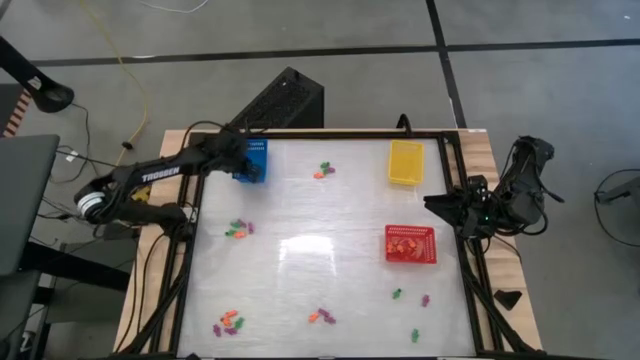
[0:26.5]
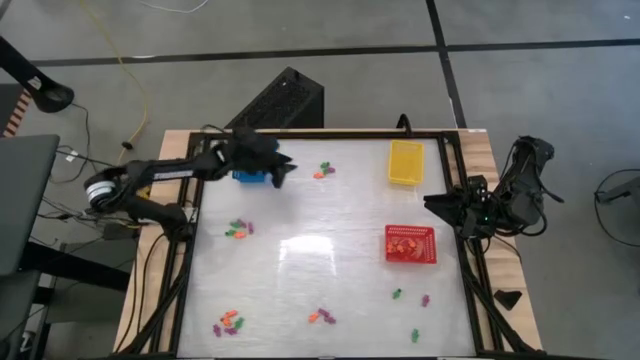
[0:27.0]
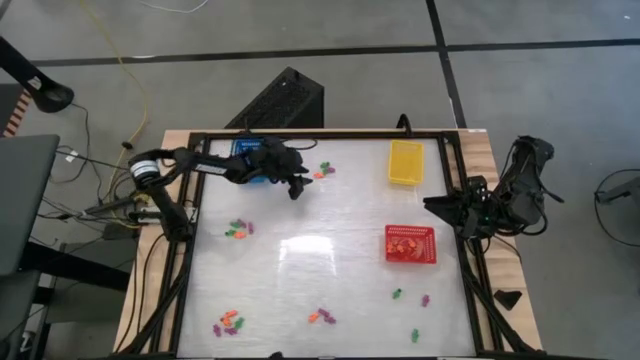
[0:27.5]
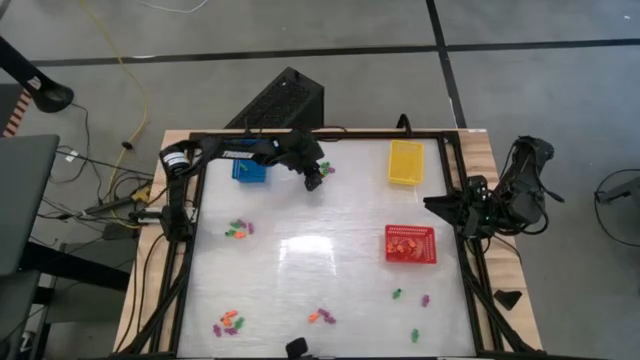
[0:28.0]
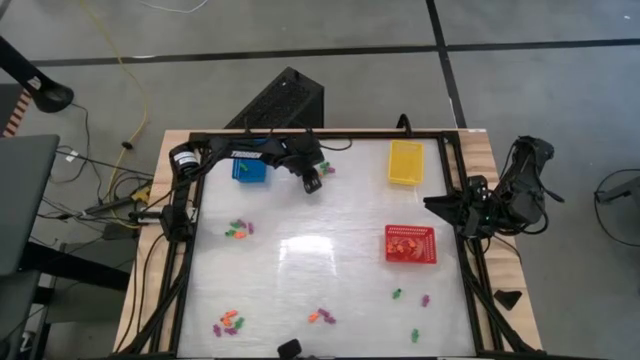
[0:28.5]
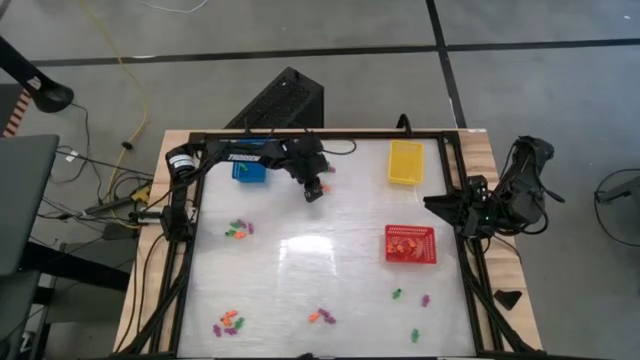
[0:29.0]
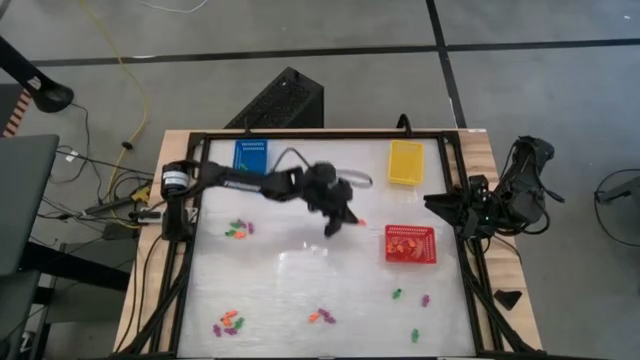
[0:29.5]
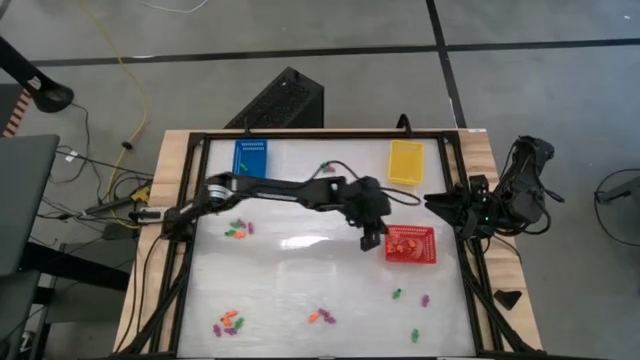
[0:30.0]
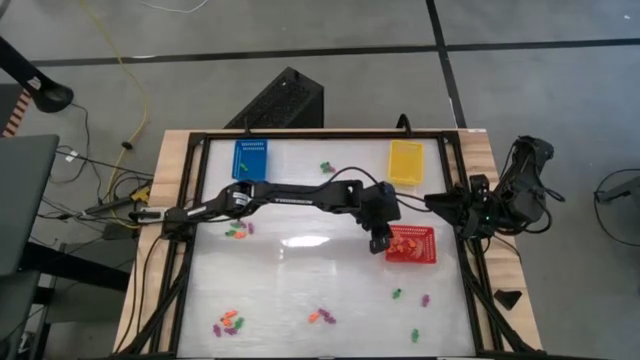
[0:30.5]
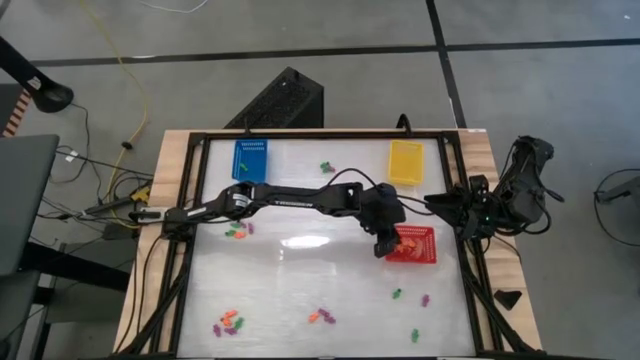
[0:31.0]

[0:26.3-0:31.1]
Task: Sort Halloween decoration
Put the orange skeleton toy into the red bin

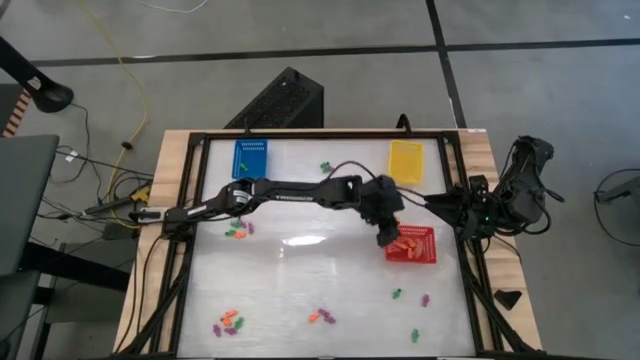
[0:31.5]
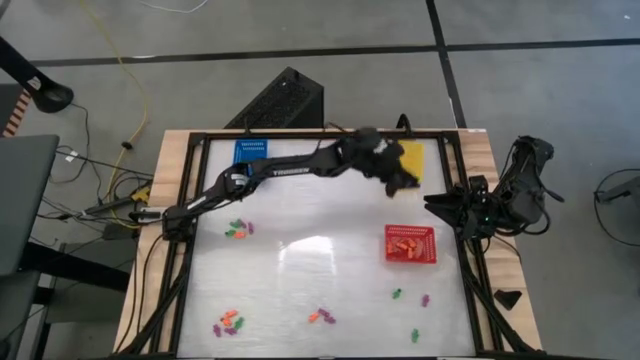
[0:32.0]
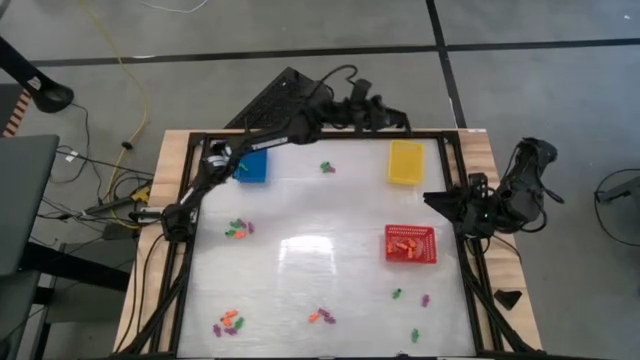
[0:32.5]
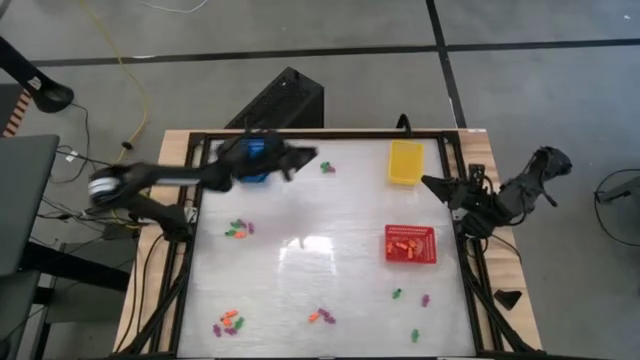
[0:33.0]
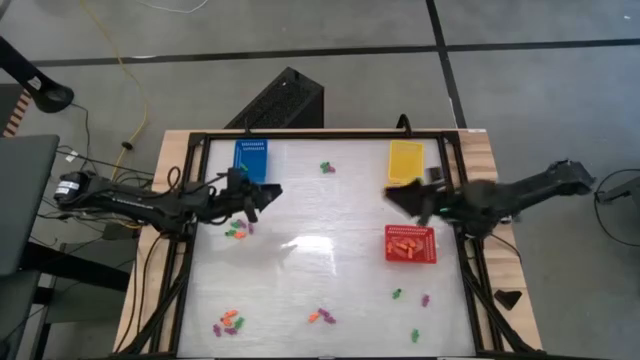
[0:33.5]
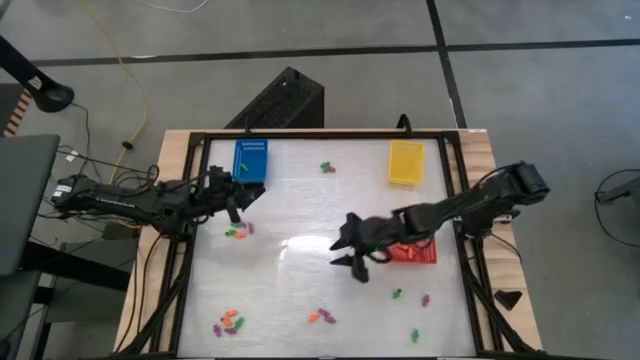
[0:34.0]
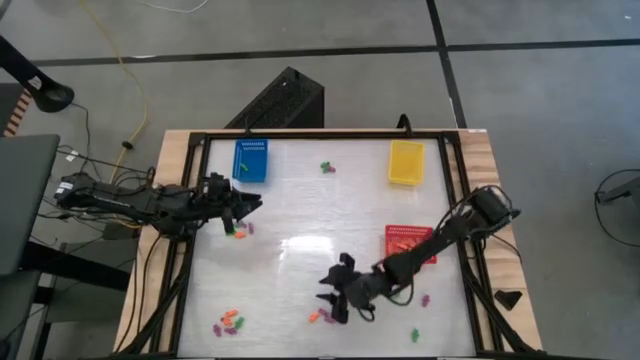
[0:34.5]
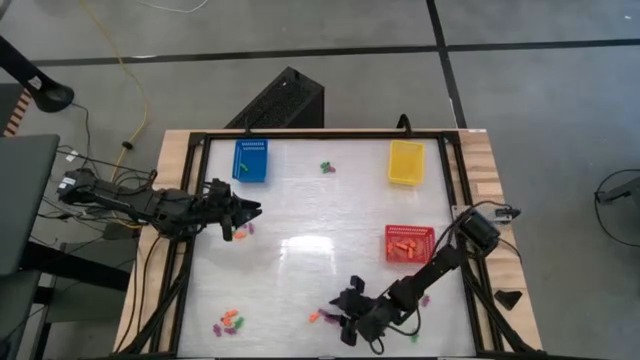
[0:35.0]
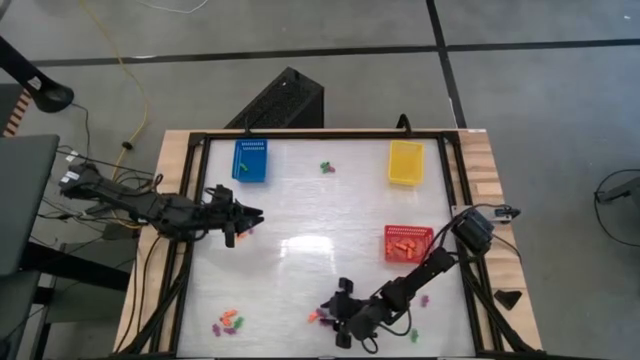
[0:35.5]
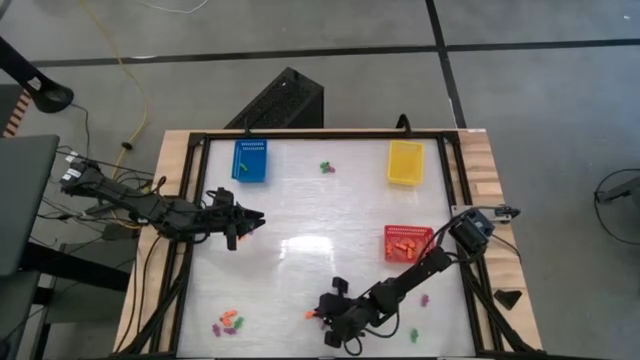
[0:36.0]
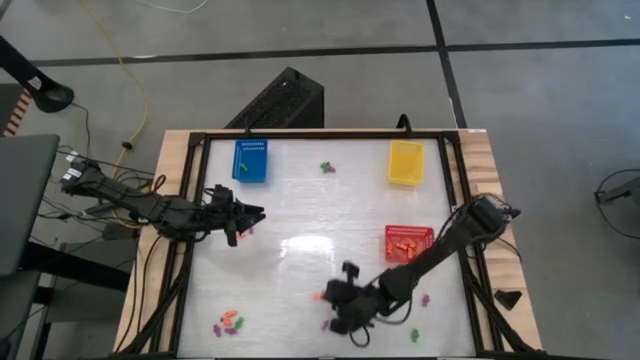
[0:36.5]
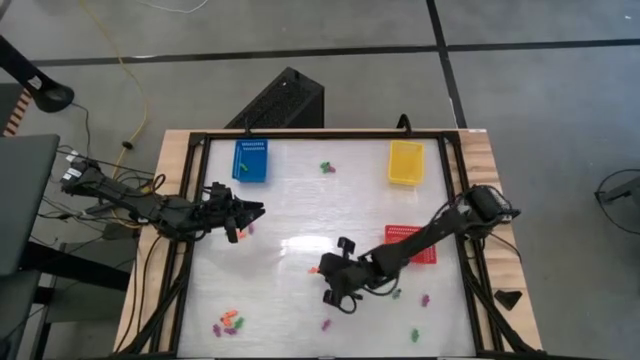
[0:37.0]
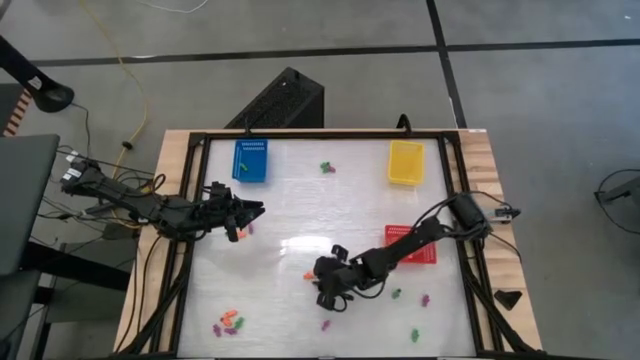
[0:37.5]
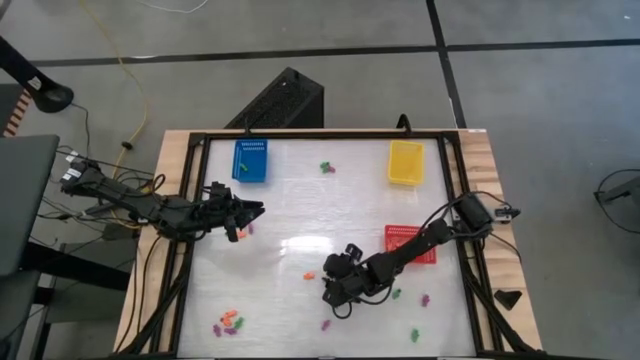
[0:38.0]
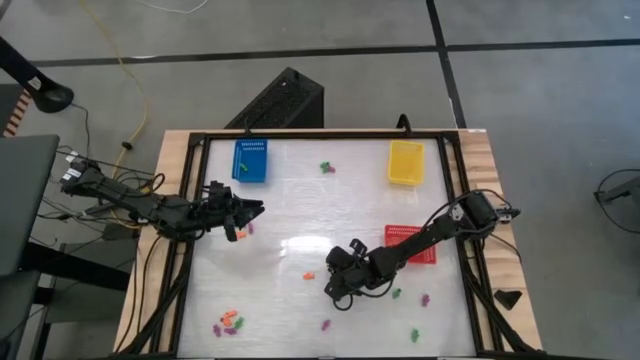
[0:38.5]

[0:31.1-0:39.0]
Put the purple skeleton toy into the yellow bin

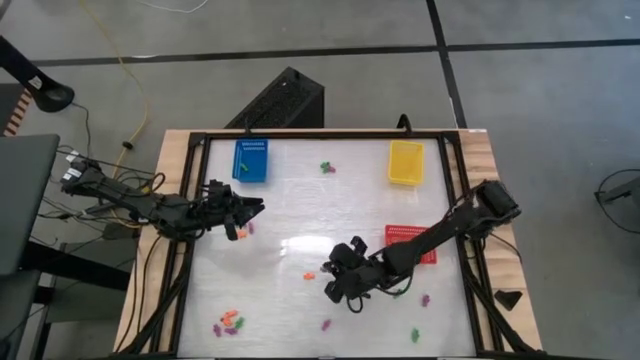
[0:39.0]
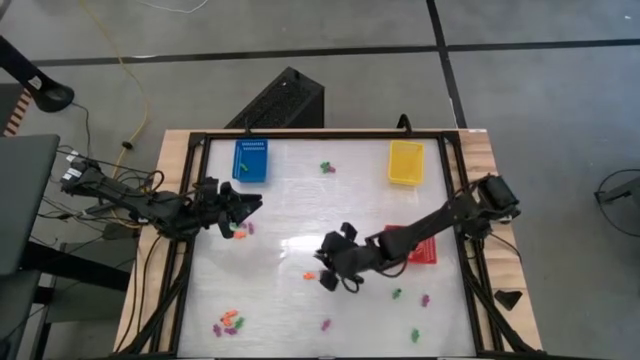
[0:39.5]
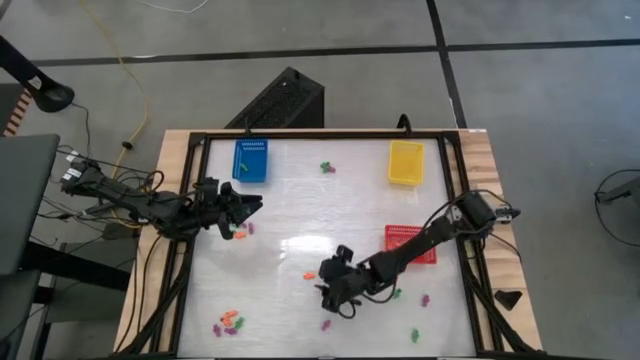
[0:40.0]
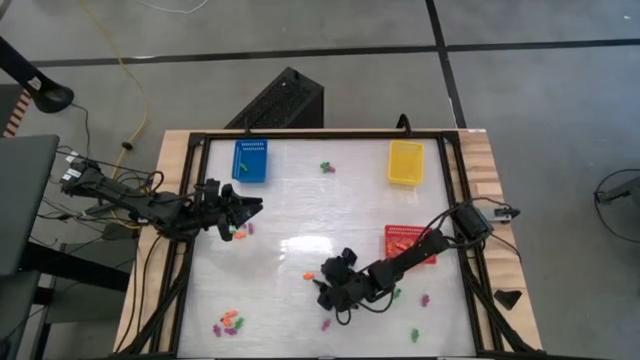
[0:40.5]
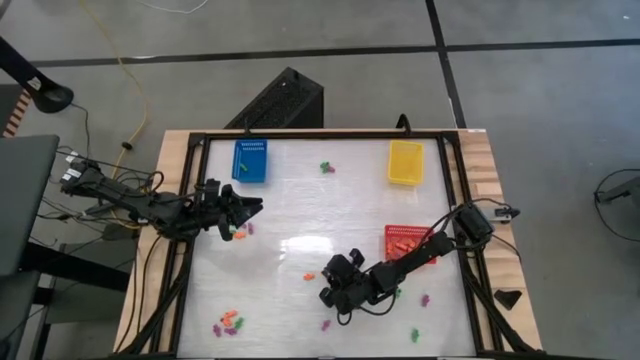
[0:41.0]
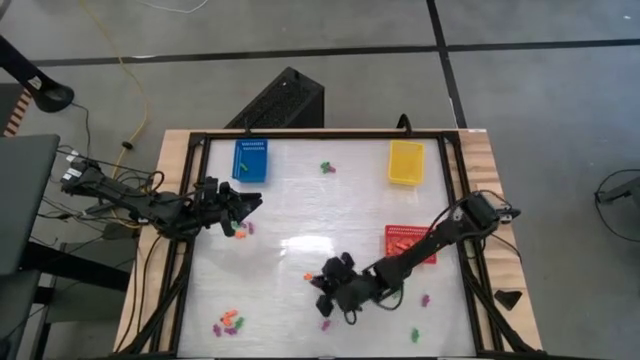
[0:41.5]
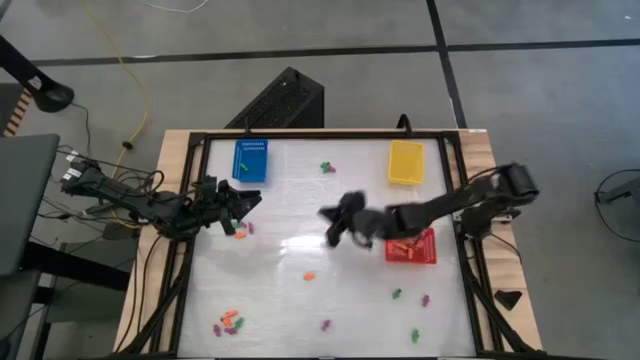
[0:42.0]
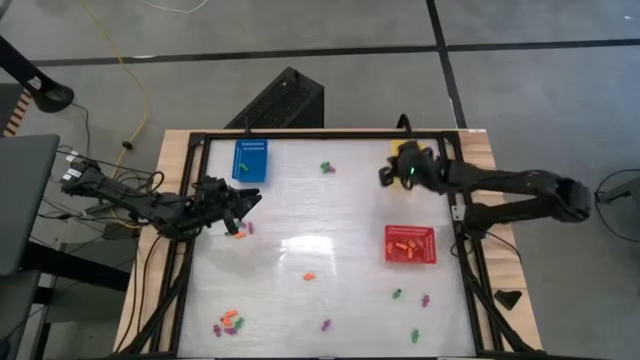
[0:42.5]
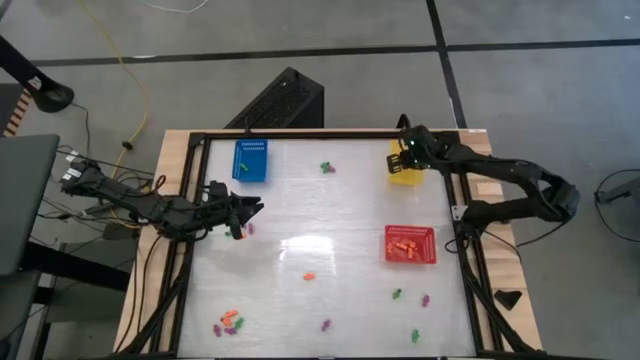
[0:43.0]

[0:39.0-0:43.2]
Put the purple skeleton toy into the yellow bin

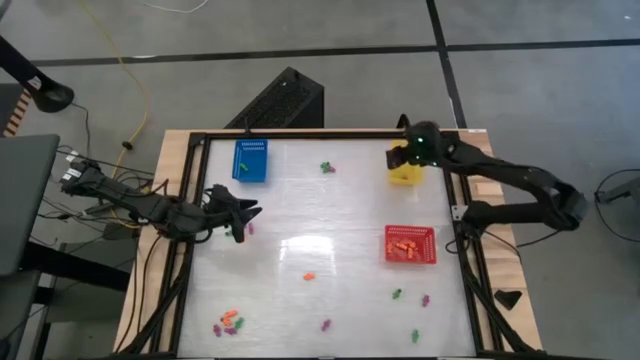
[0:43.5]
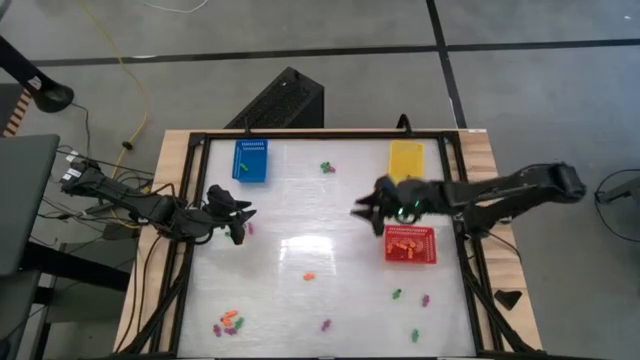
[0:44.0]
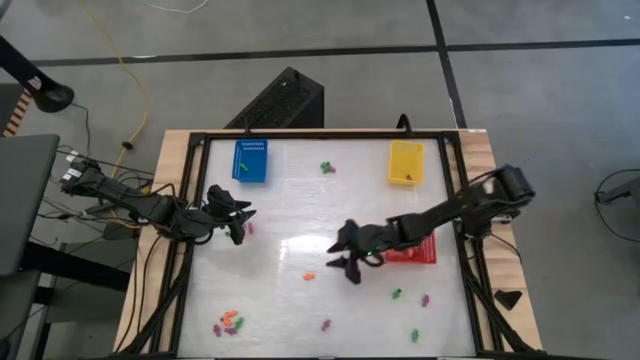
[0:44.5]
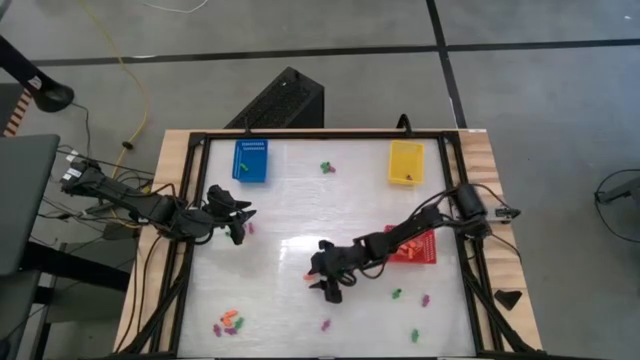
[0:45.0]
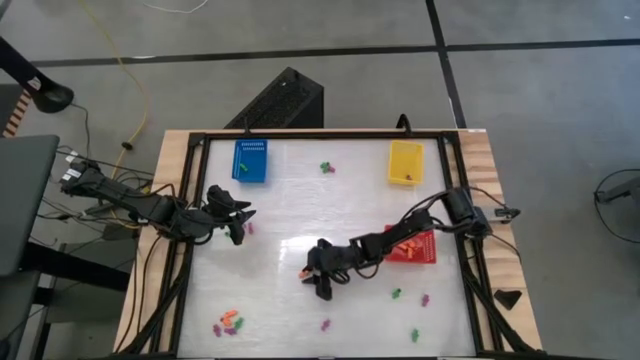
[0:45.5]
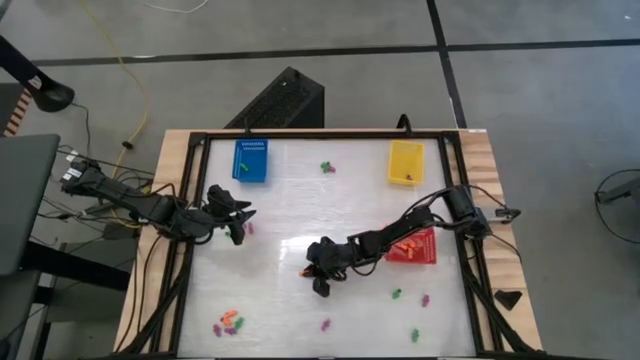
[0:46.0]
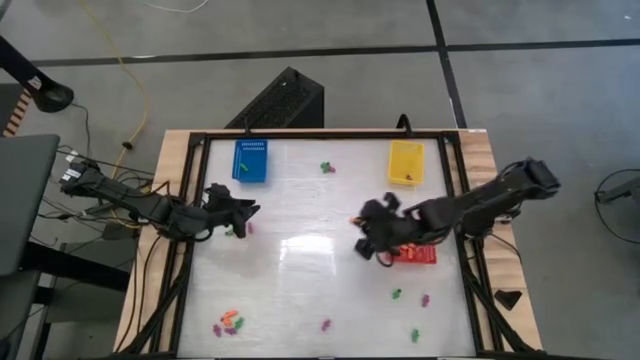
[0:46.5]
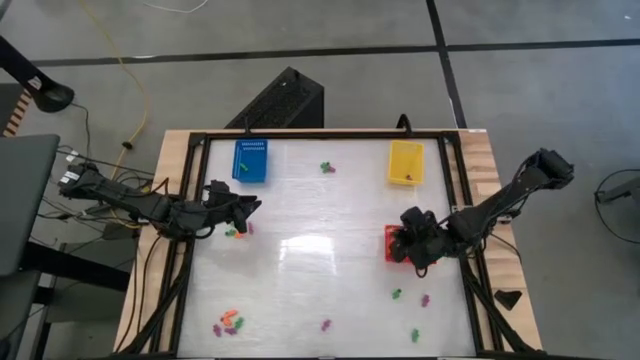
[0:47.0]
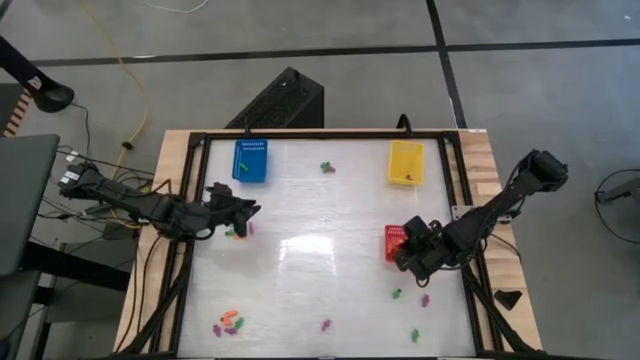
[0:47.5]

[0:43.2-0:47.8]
Put the orange skeleton toy into the red bin

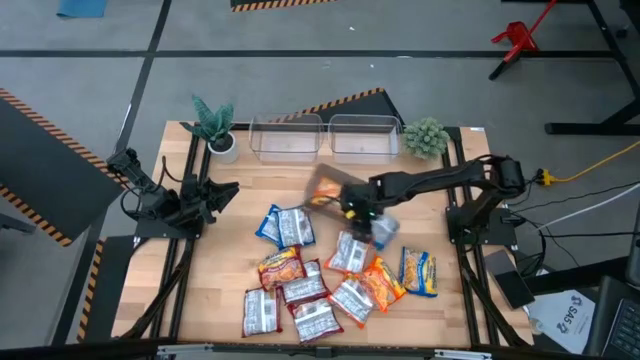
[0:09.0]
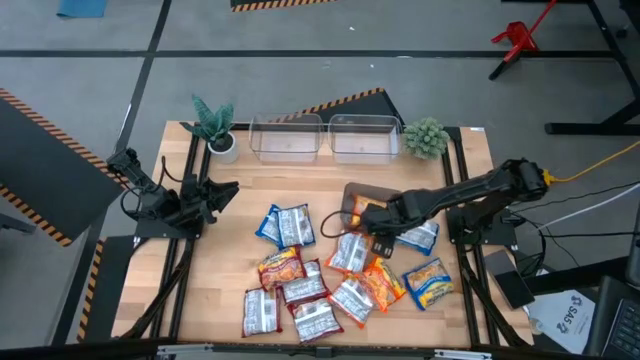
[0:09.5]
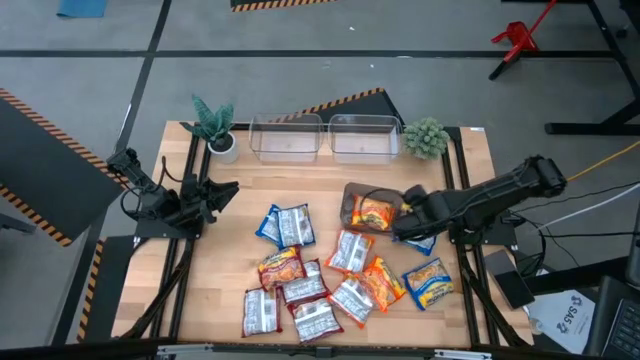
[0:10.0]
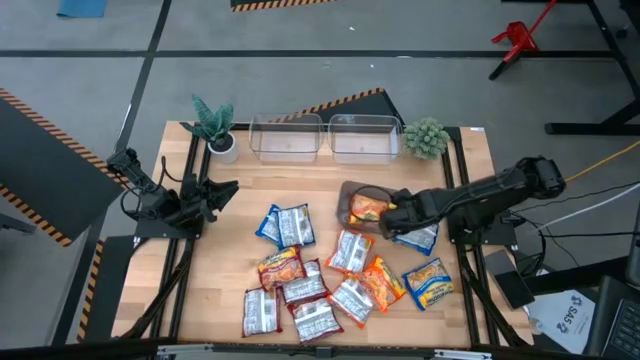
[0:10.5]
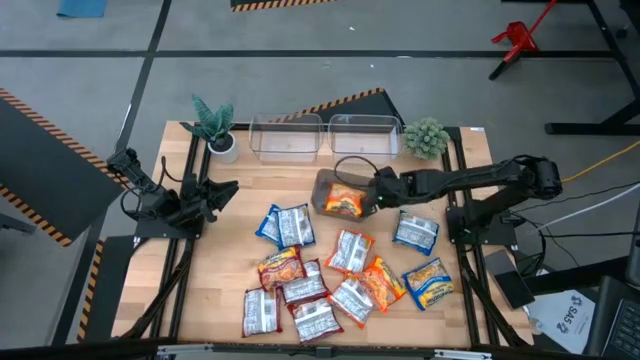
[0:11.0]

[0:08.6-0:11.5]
Task: Sort Maruchan noodles
Adjust the black bin
